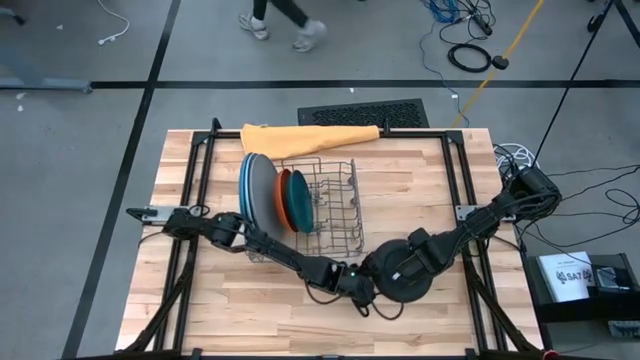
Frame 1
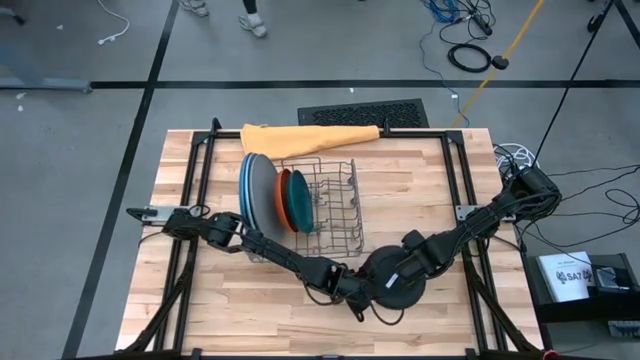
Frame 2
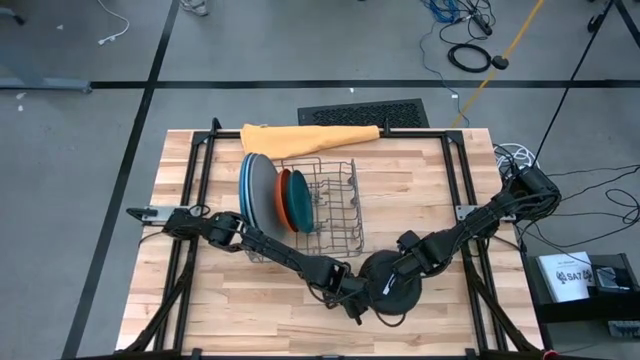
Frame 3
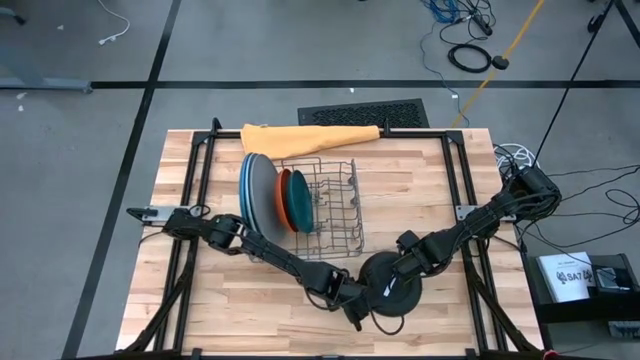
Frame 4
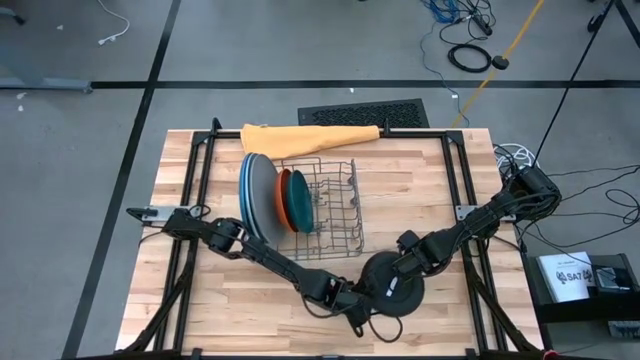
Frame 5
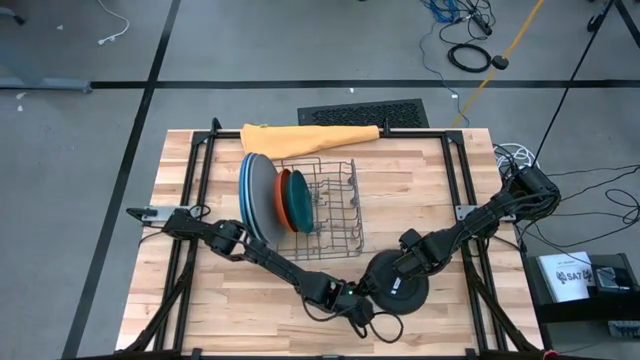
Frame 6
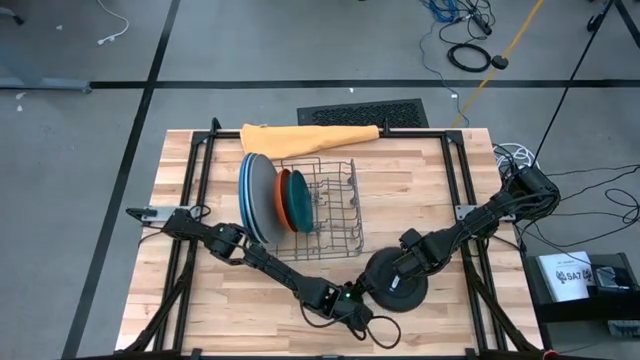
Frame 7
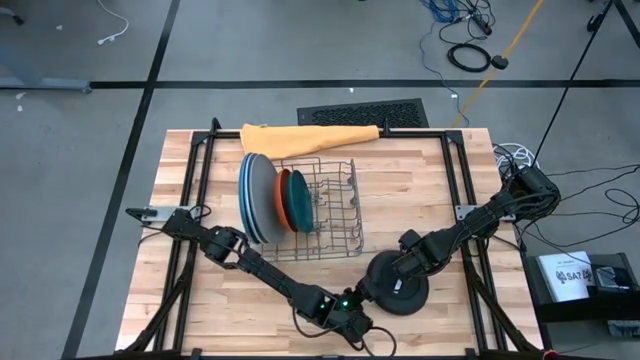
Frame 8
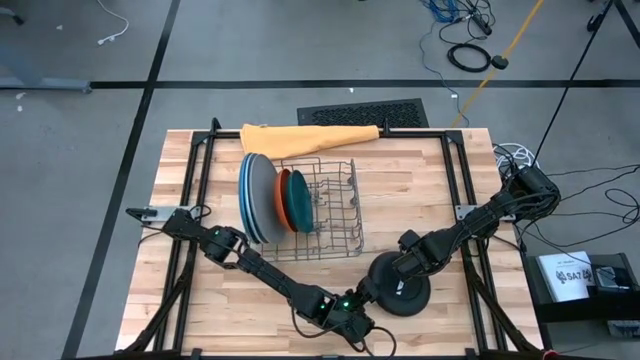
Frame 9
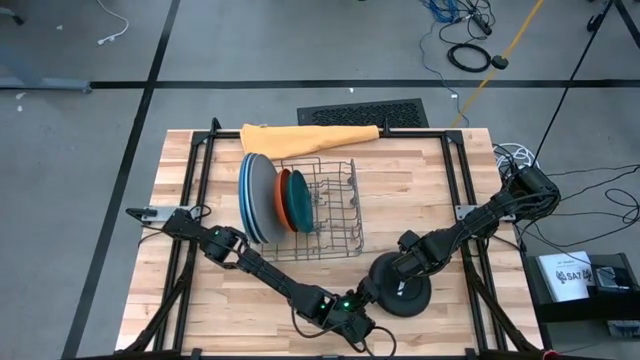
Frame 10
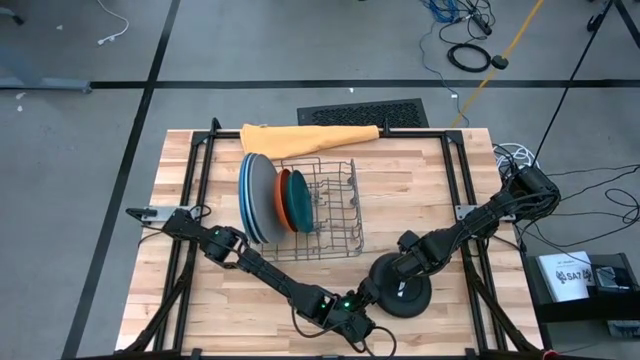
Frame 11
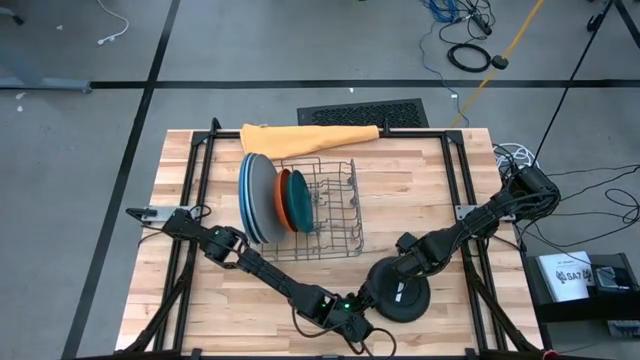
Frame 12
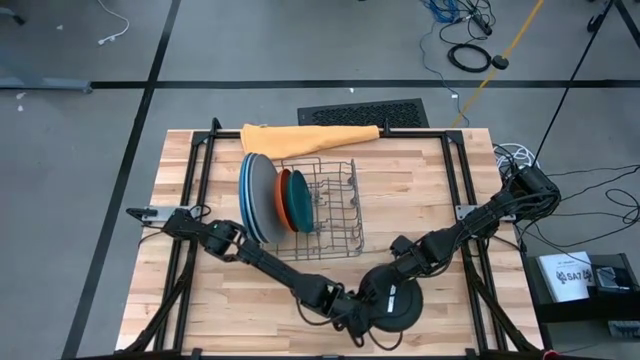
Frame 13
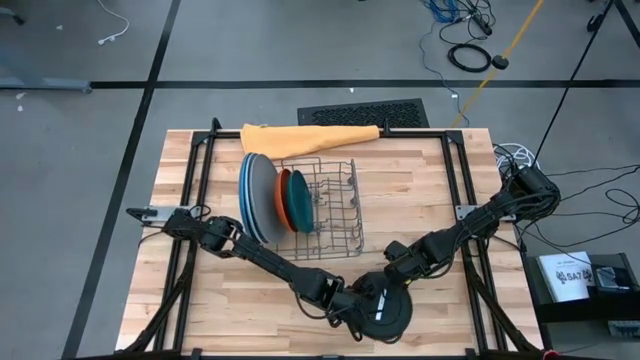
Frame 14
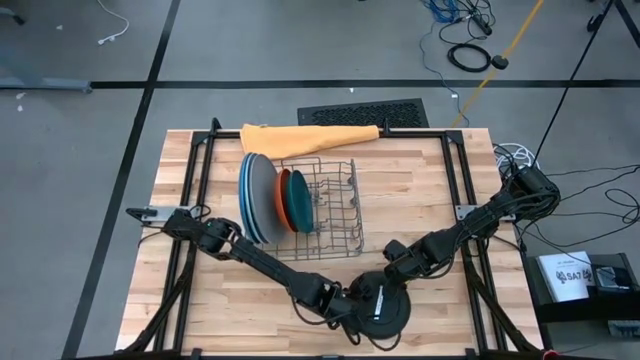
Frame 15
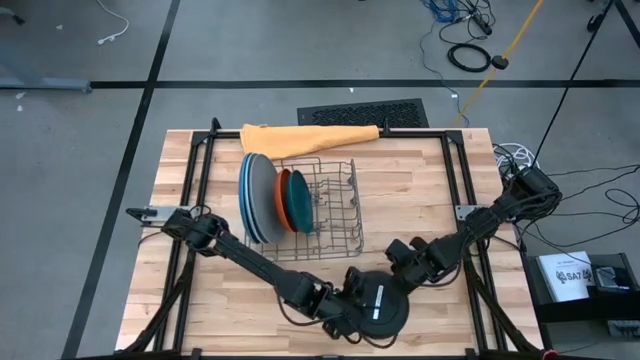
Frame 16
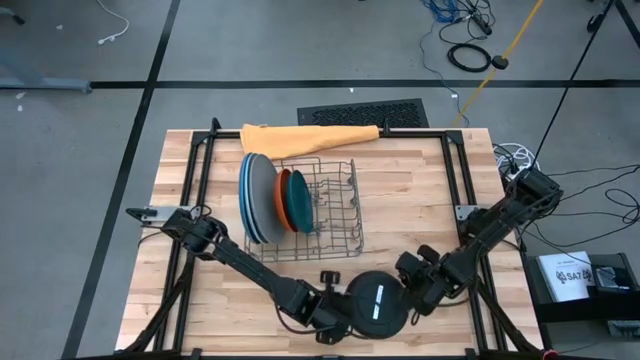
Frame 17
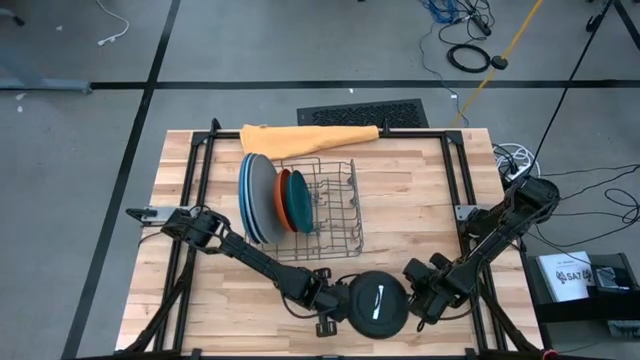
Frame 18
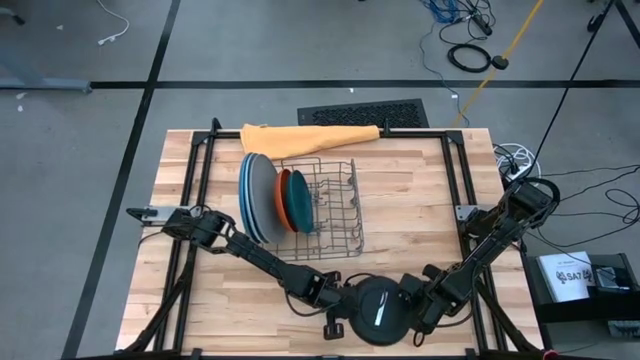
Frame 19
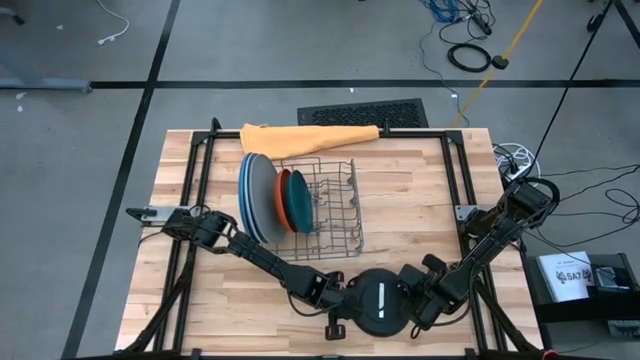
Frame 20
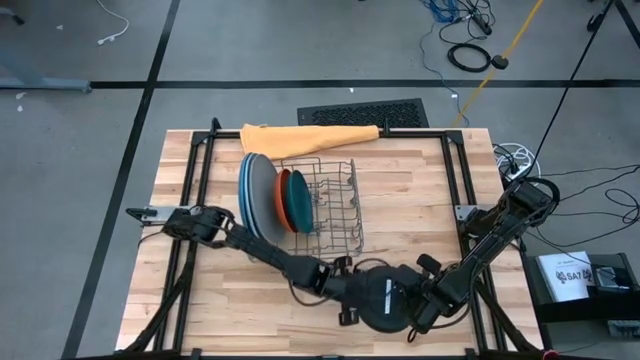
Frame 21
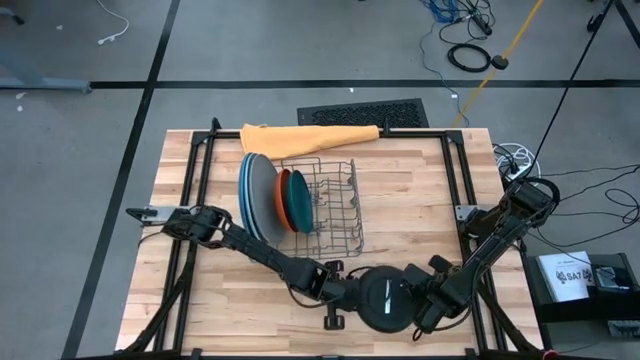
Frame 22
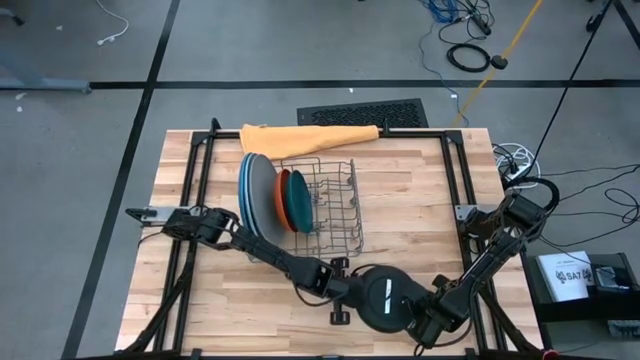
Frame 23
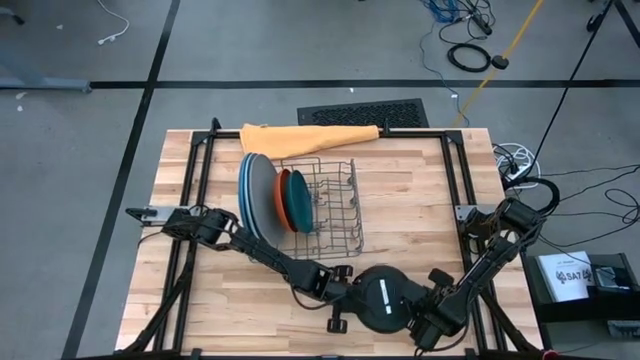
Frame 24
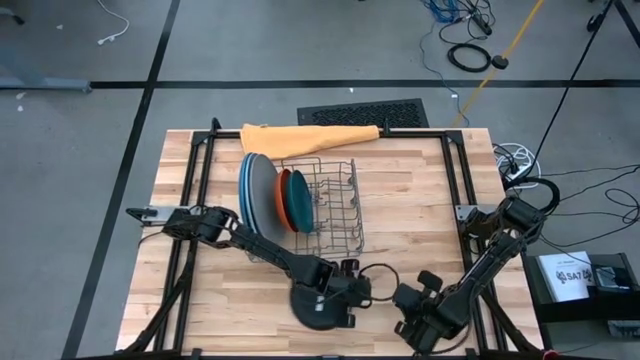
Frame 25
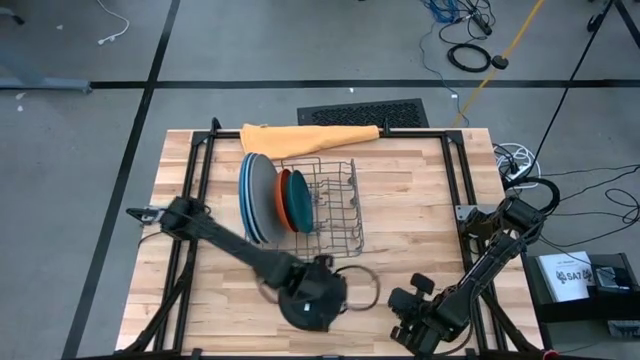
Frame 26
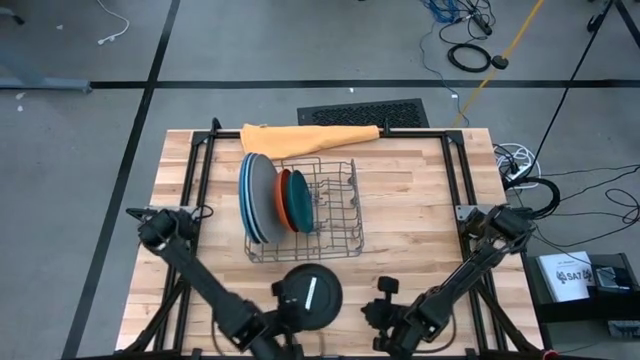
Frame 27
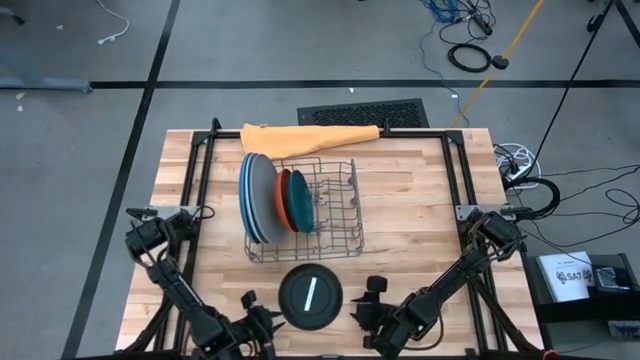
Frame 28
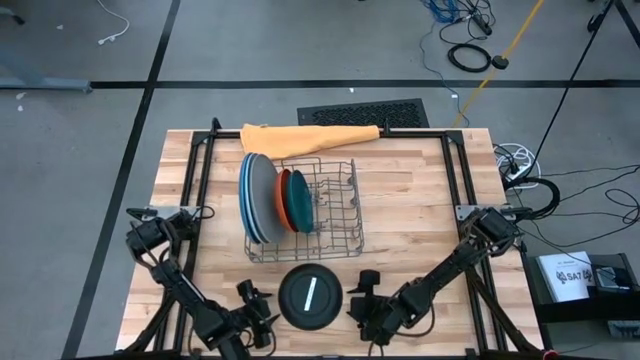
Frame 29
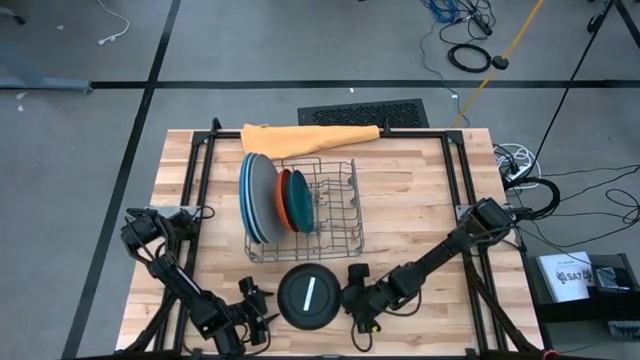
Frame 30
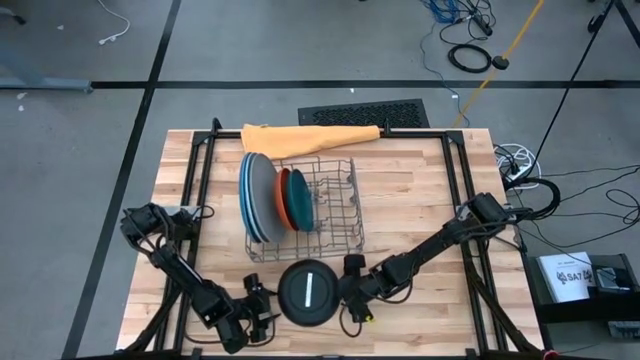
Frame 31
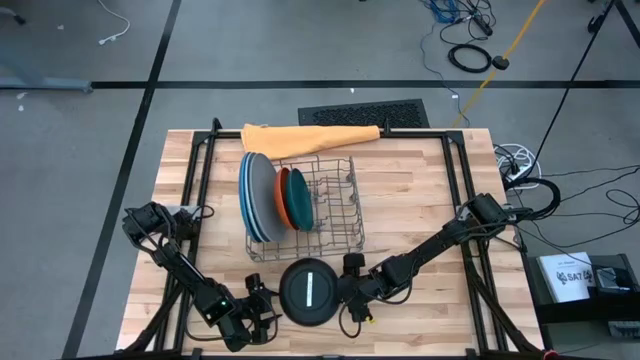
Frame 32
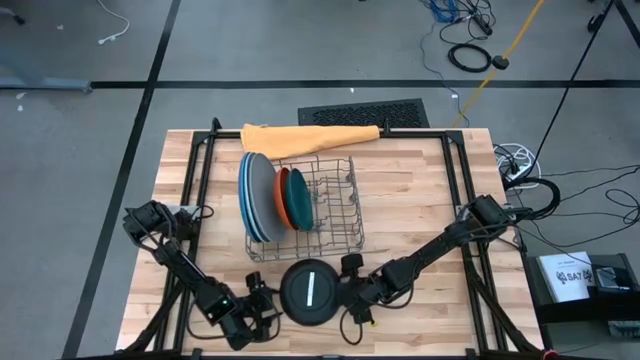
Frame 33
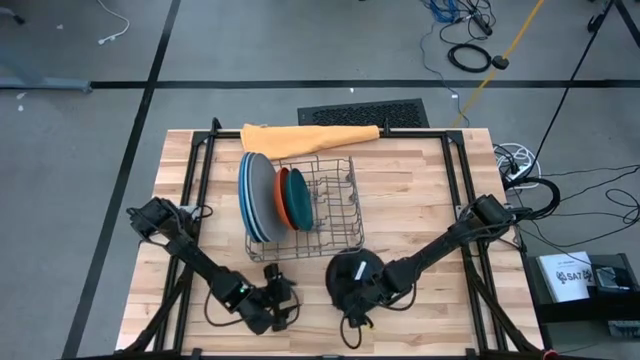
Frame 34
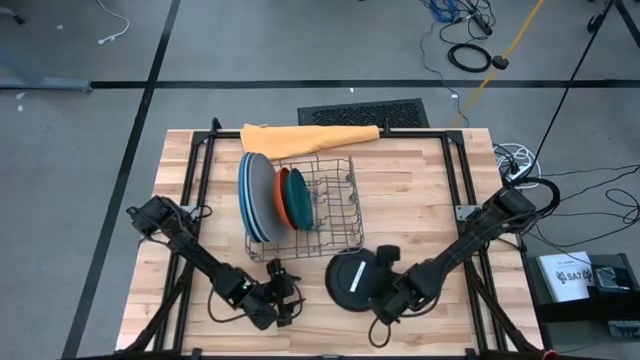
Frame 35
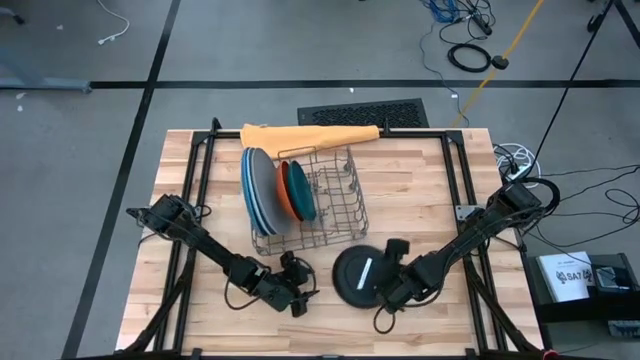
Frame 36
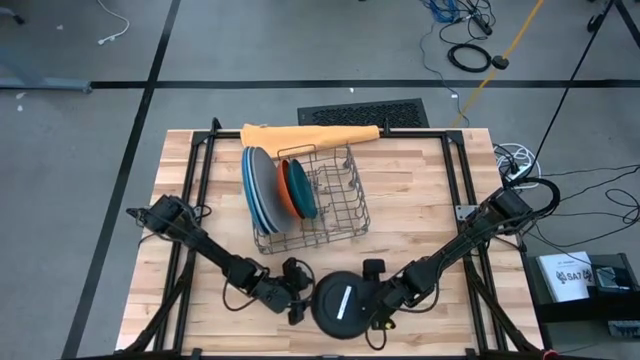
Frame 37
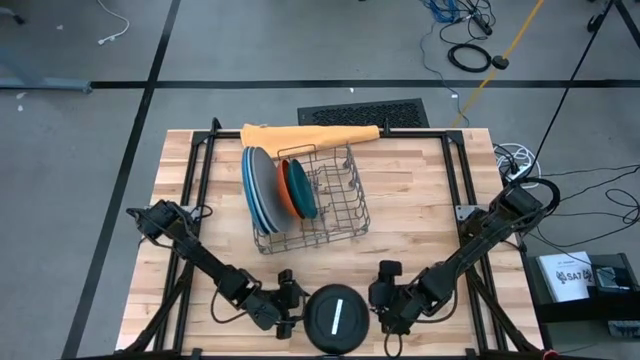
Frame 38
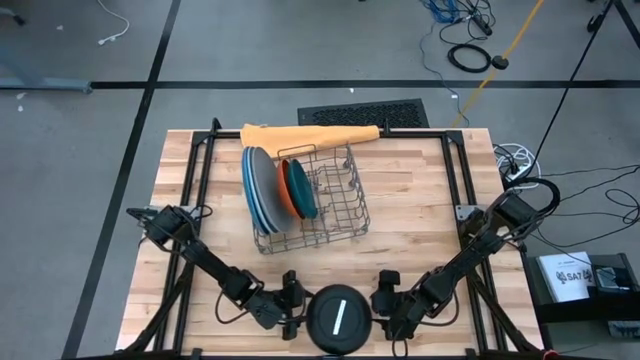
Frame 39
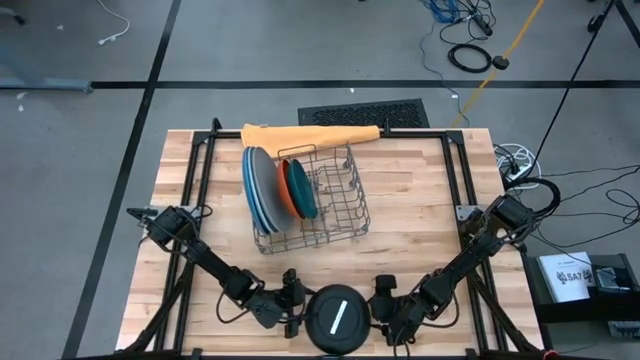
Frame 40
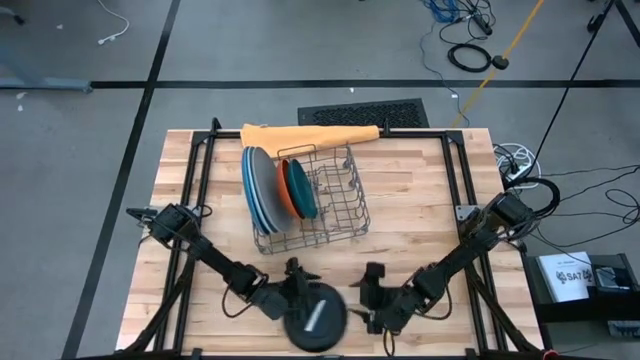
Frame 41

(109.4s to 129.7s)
Task: Sort dishes
Put the black plate in the dish rack
